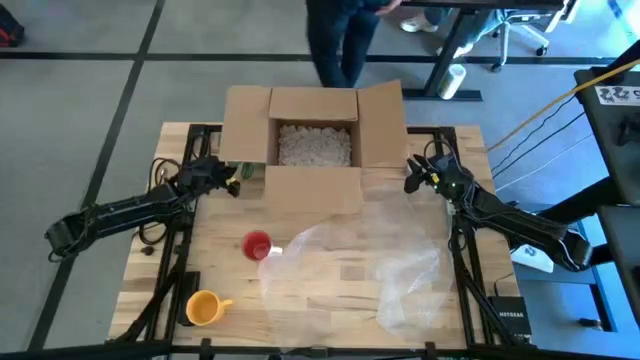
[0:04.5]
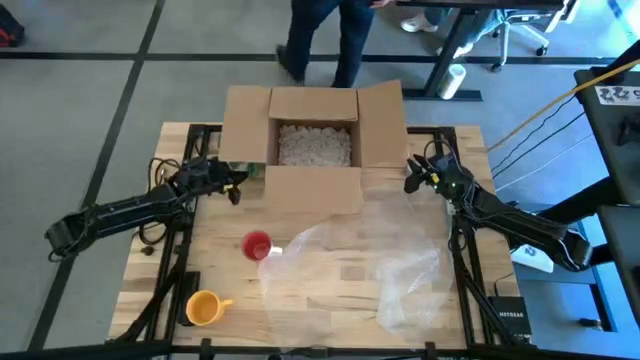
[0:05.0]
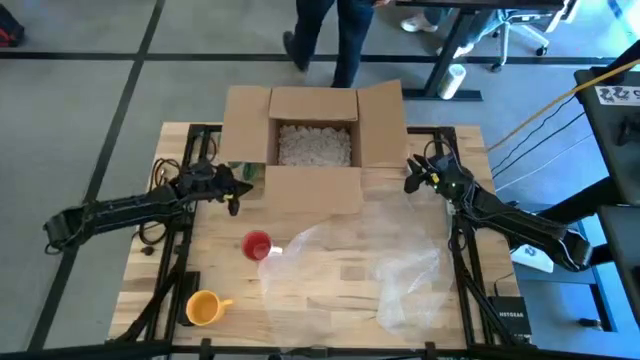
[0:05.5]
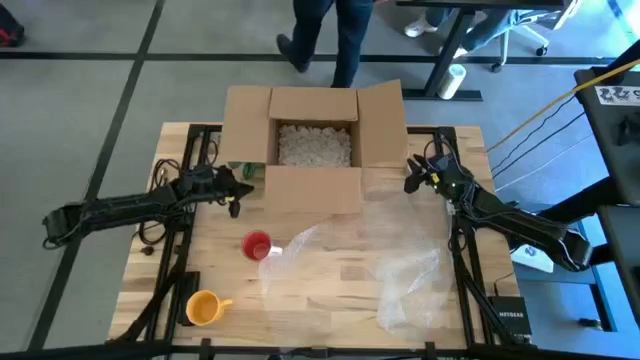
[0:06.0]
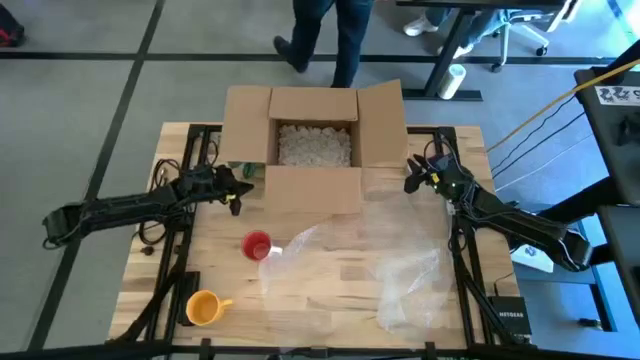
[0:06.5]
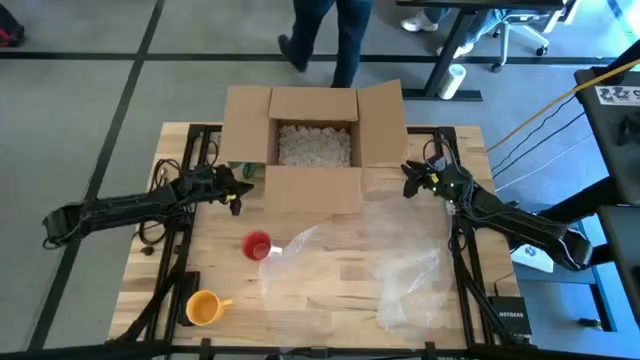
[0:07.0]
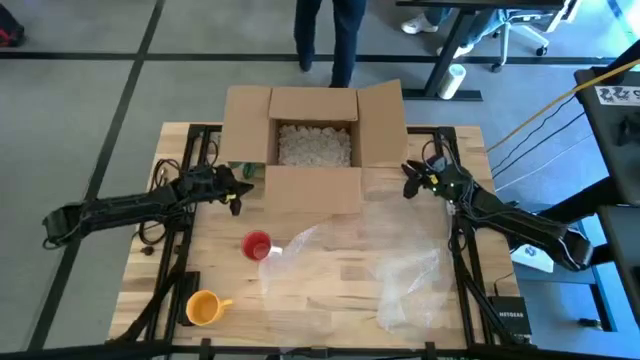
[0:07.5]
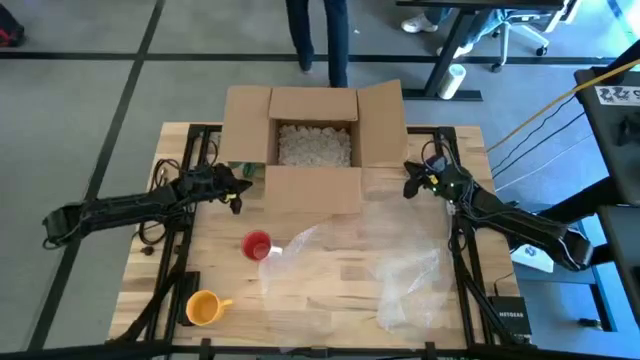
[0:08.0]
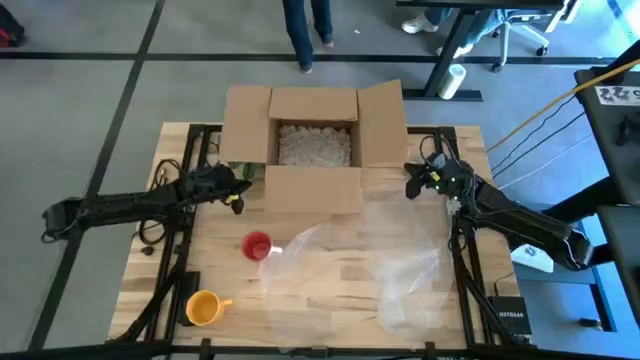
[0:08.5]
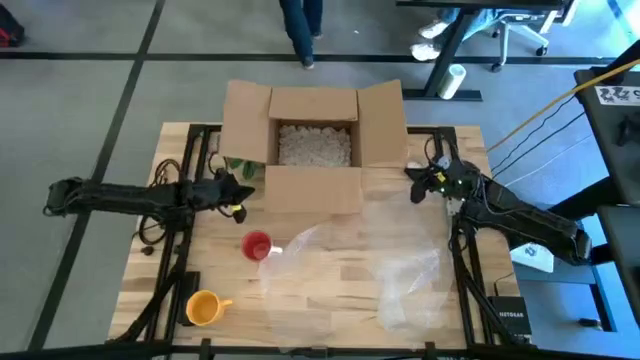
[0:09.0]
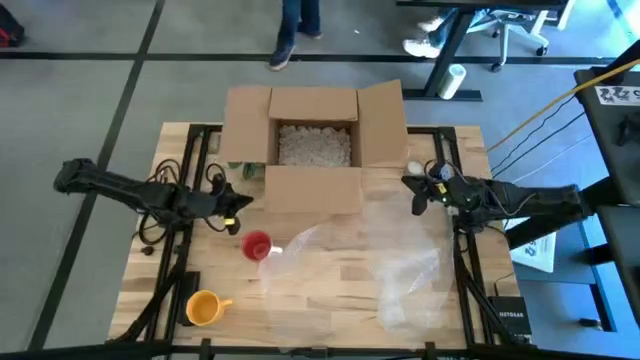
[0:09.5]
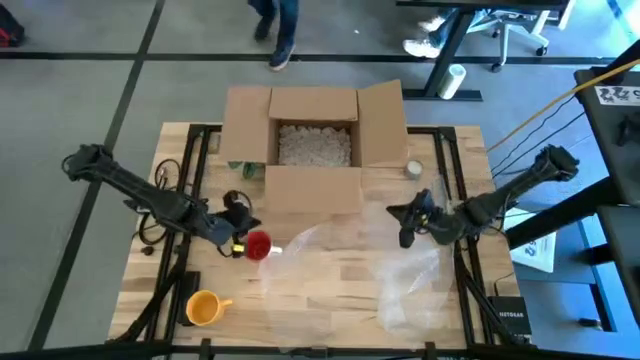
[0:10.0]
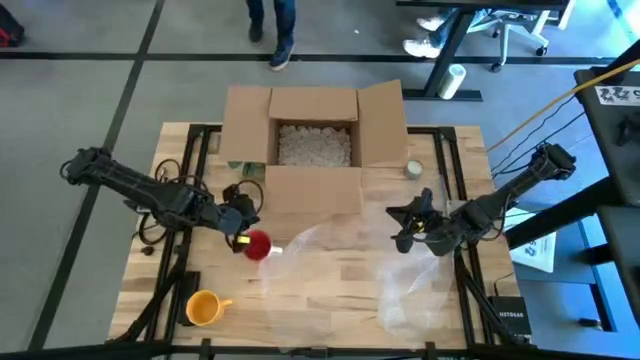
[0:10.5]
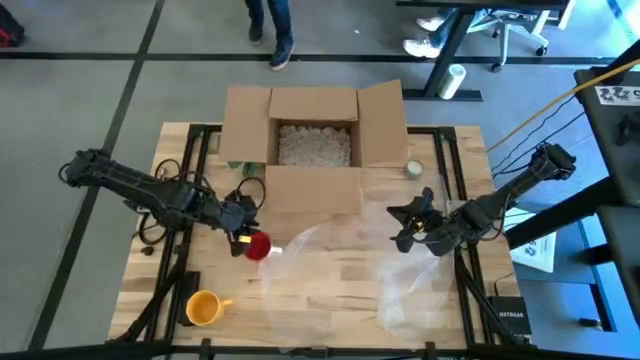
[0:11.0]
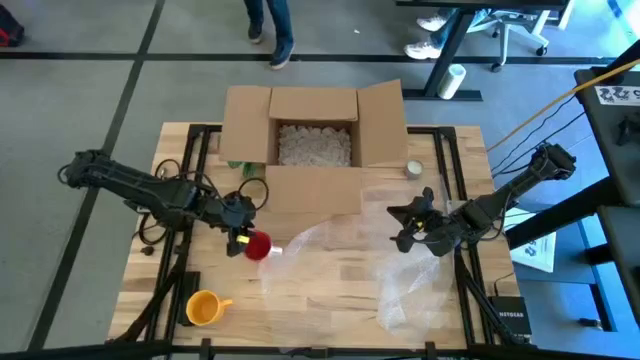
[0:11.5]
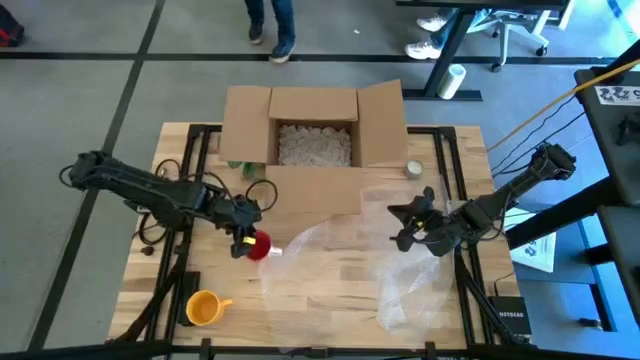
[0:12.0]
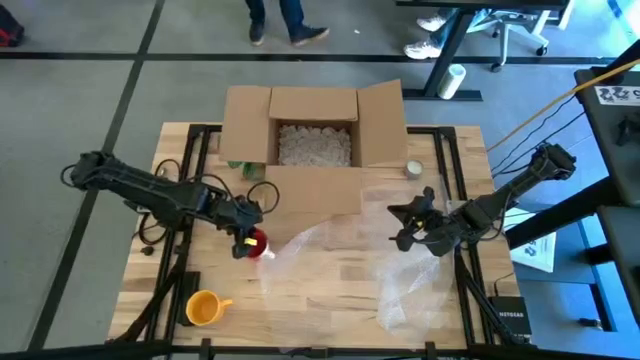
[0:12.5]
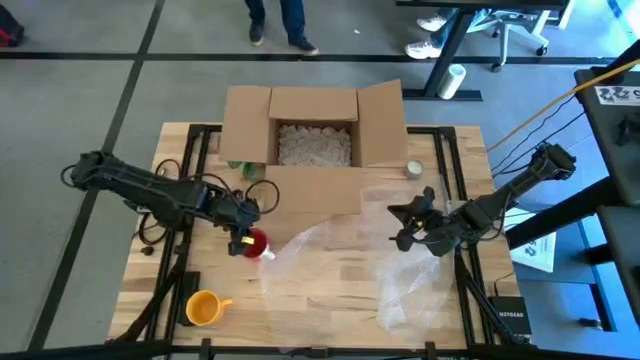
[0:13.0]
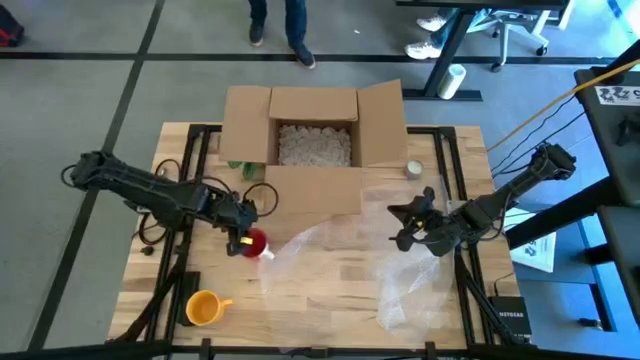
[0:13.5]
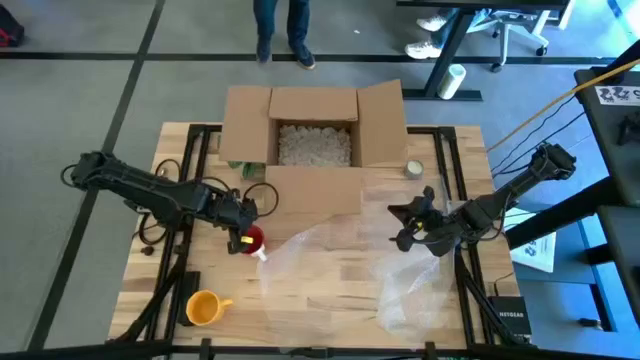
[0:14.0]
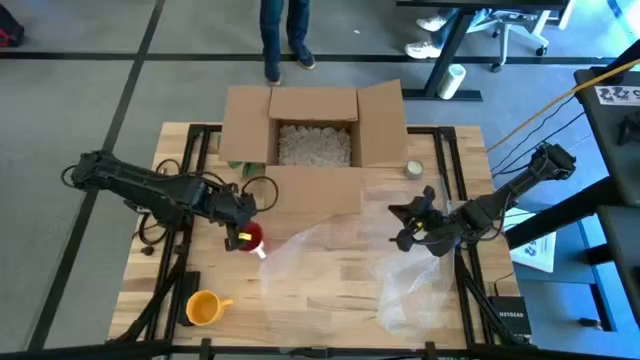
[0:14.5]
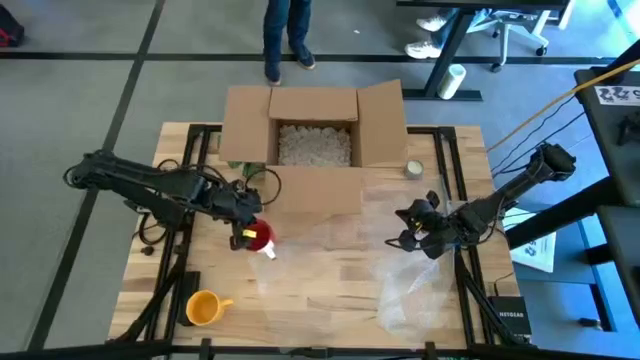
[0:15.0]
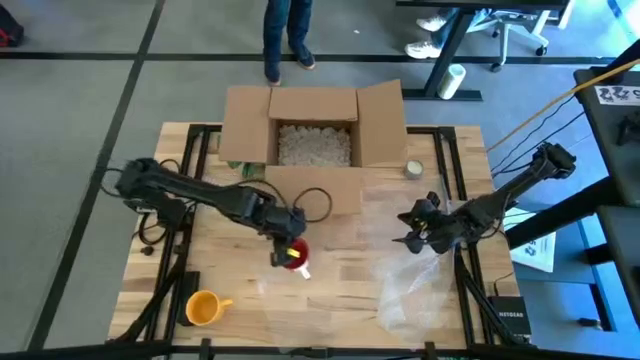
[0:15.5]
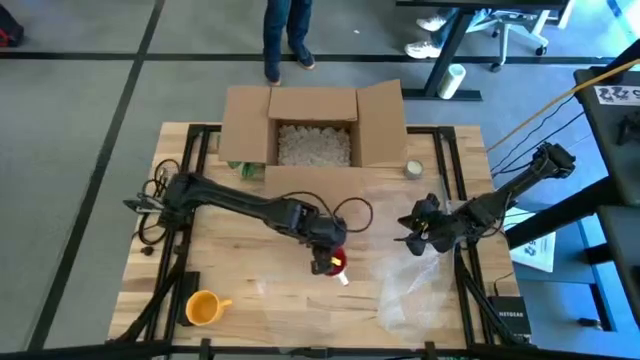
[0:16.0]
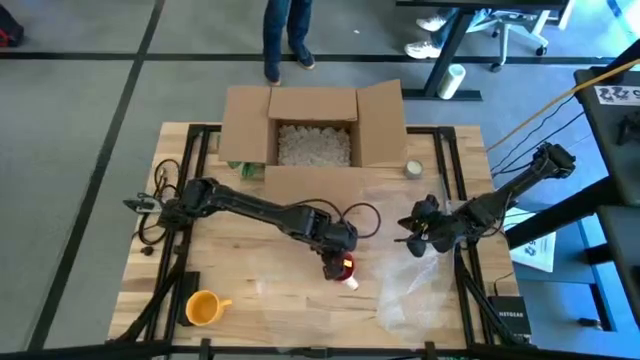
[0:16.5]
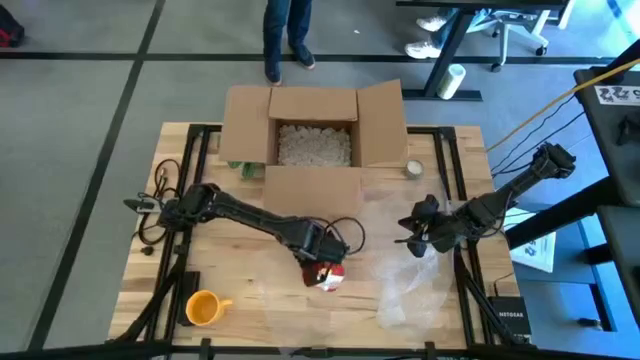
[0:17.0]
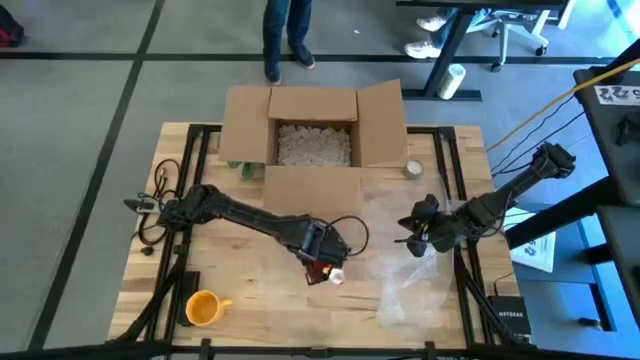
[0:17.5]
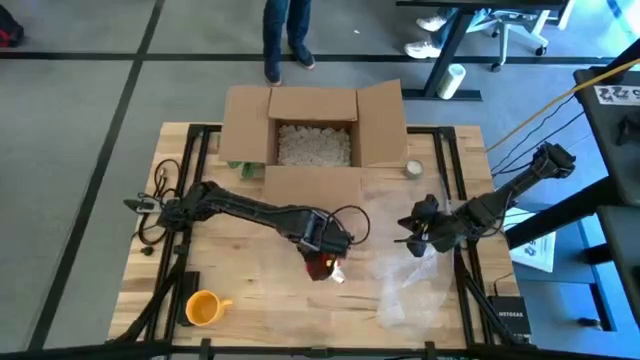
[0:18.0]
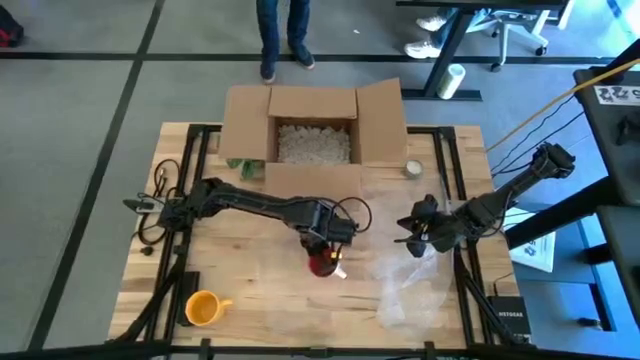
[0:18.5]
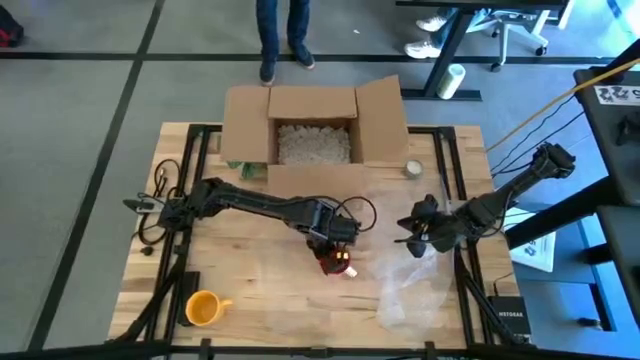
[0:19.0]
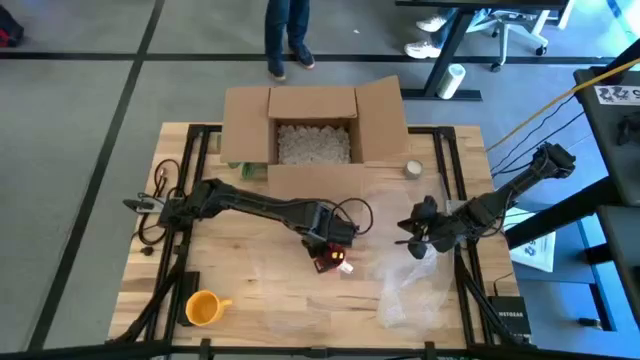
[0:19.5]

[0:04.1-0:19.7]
Task: wrap mug
Put the red mug on the bubble wrap

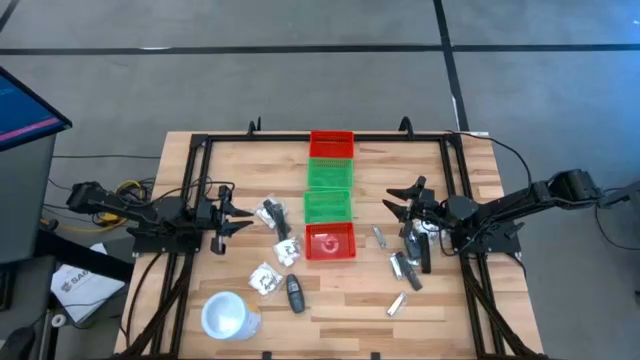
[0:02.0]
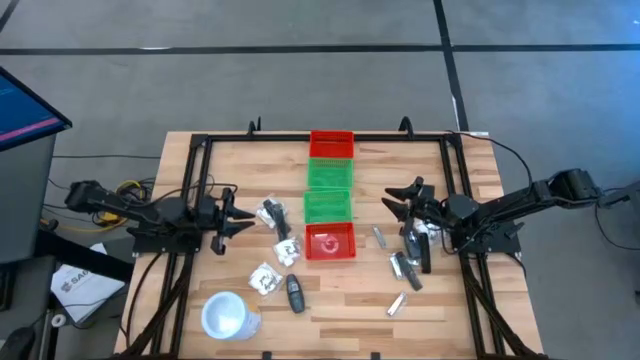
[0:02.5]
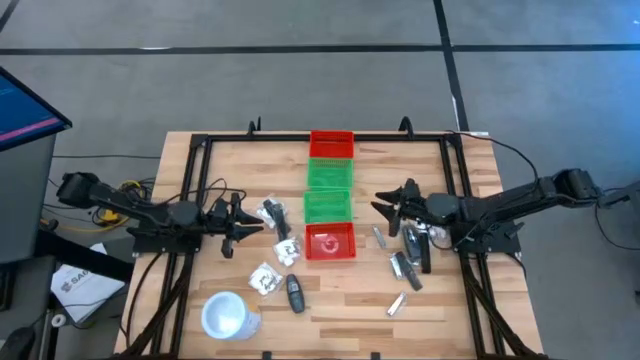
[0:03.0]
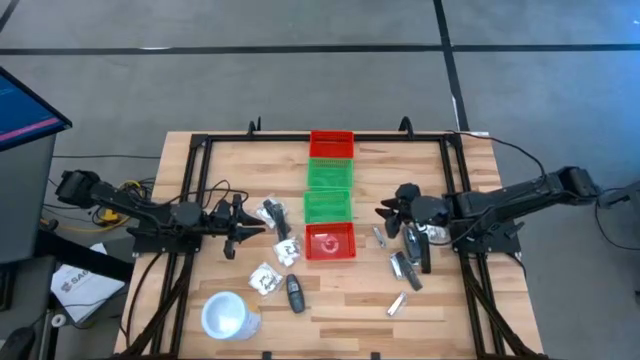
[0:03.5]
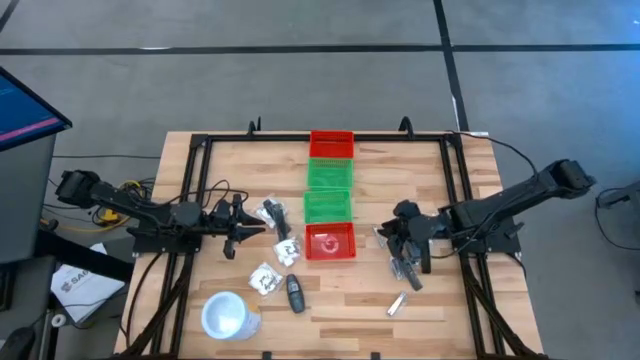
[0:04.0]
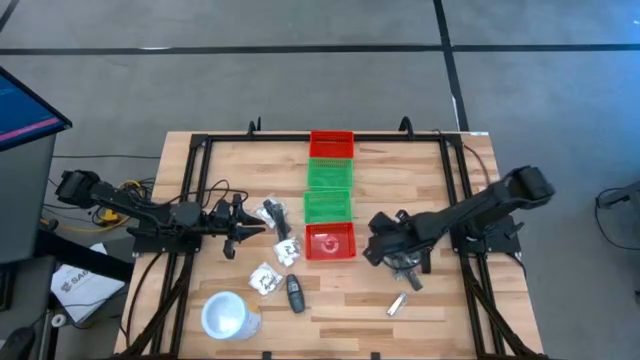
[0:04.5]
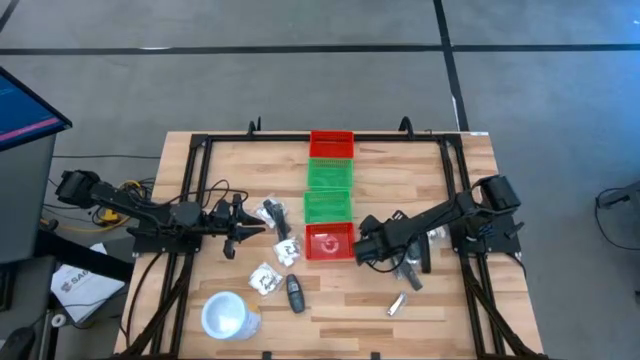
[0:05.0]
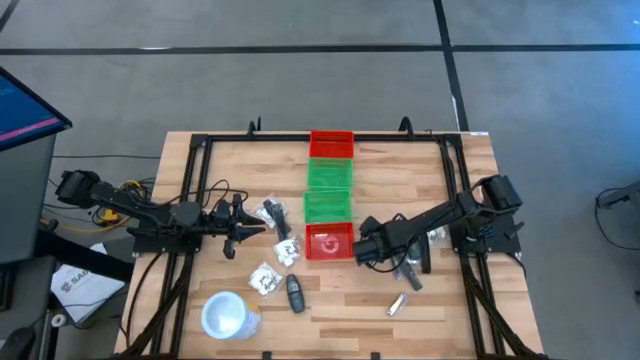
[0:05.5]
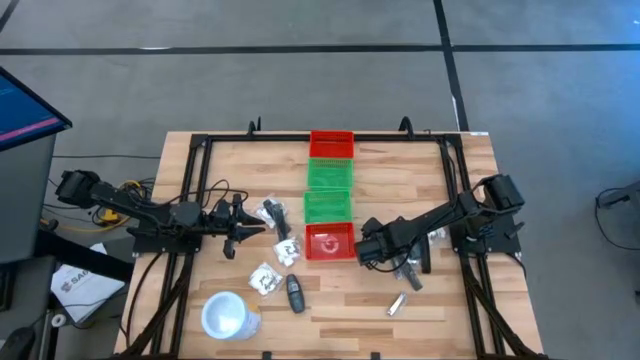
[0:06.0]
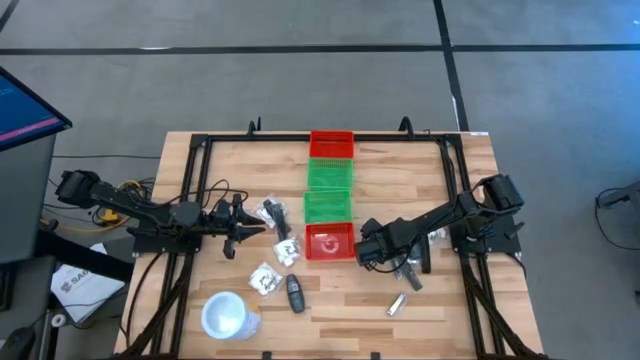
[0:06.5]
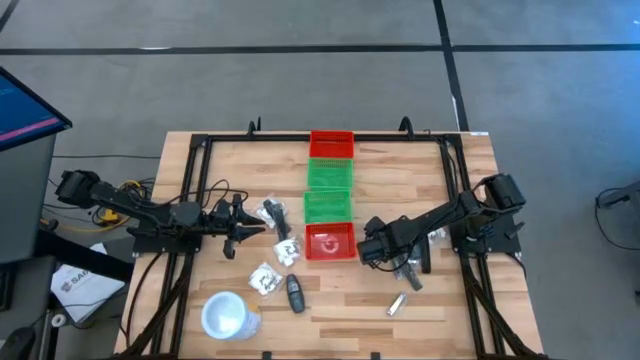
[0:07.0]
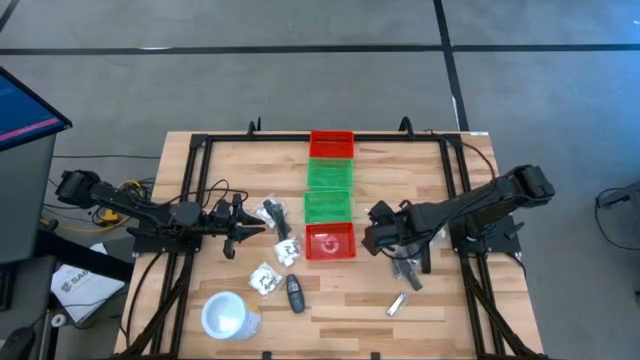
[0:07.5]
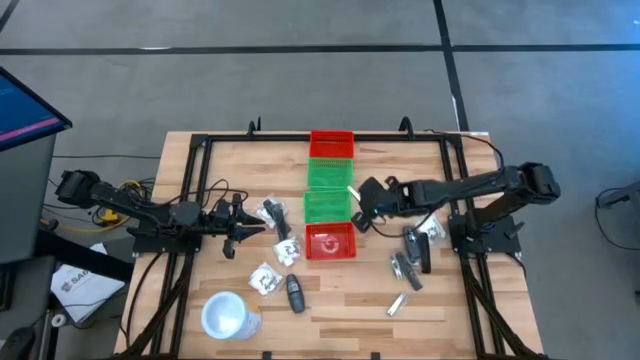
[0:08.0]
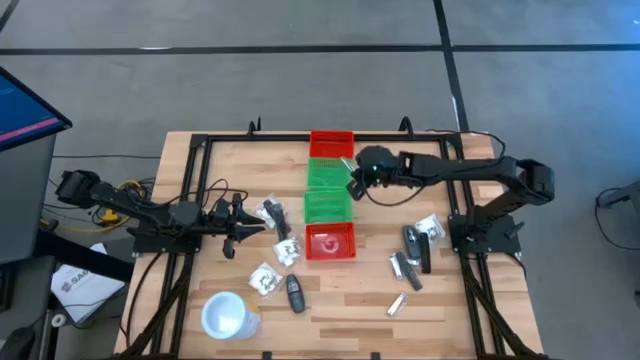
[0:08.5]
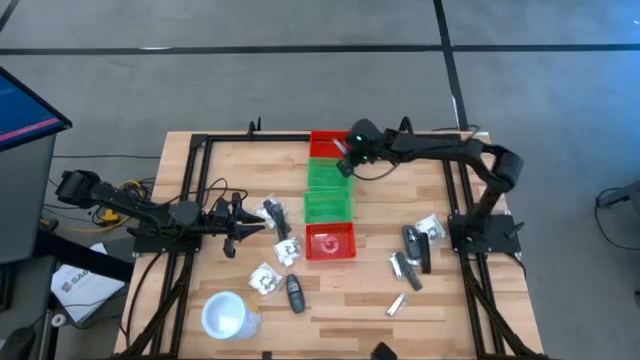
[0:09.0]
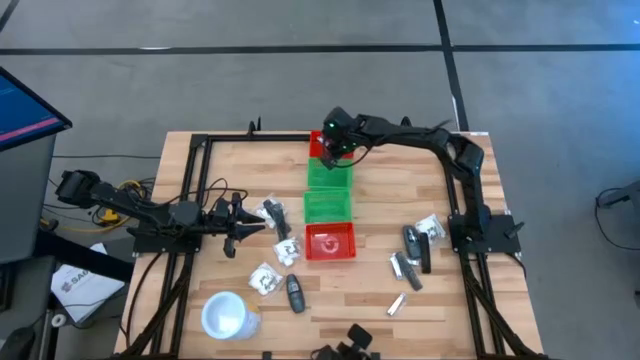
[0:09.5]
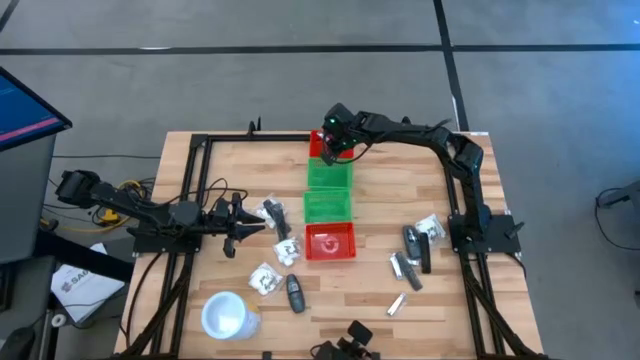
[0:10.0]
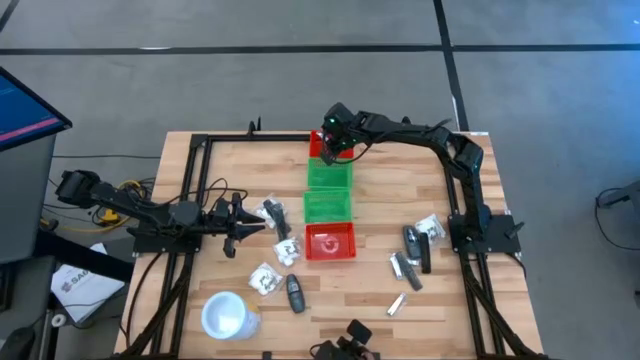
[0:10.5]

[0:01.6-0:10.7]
Task: Pick & Place Travel size toiletries
Put the silver nail cutter into the top red bin
